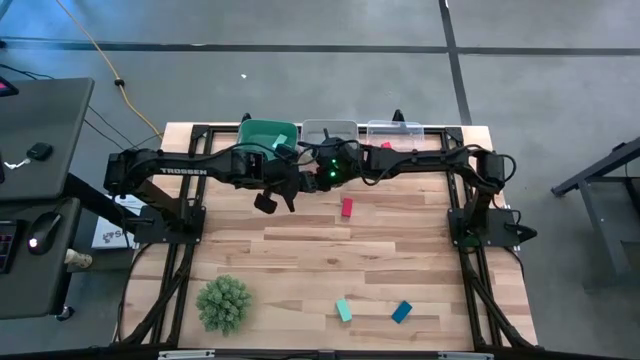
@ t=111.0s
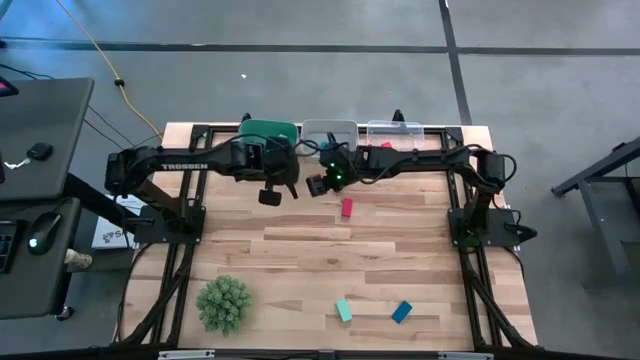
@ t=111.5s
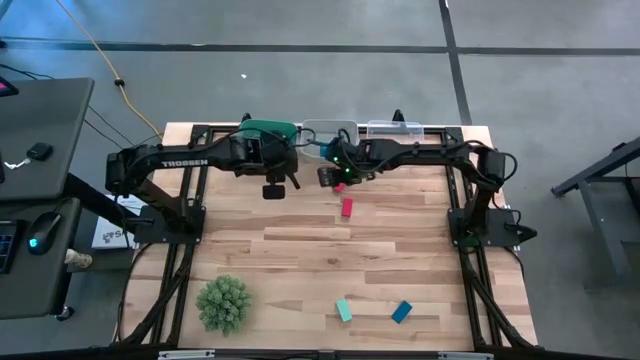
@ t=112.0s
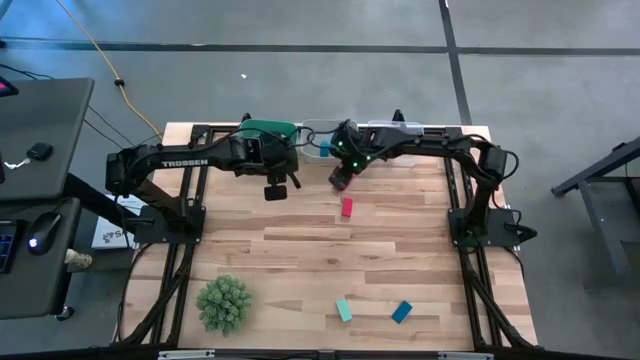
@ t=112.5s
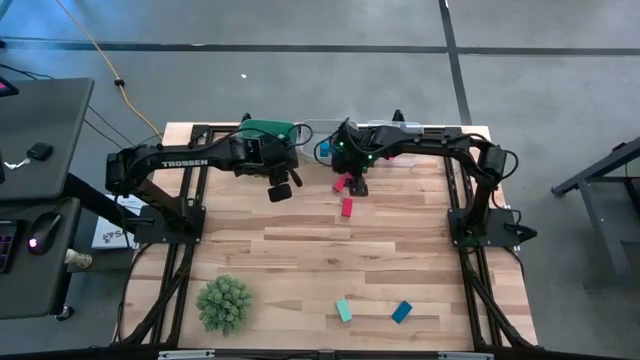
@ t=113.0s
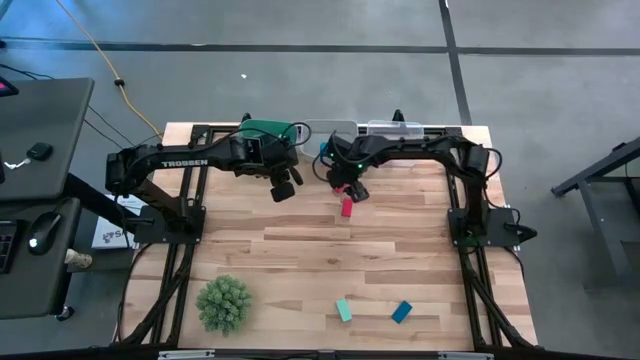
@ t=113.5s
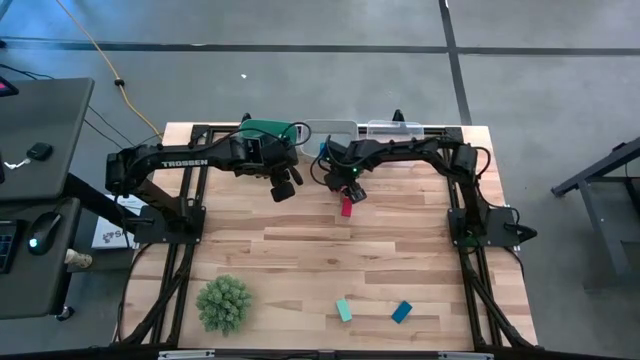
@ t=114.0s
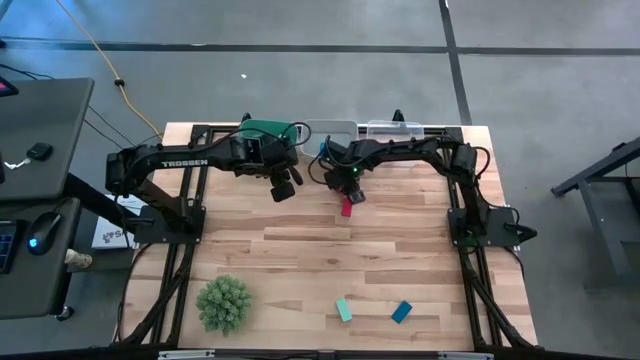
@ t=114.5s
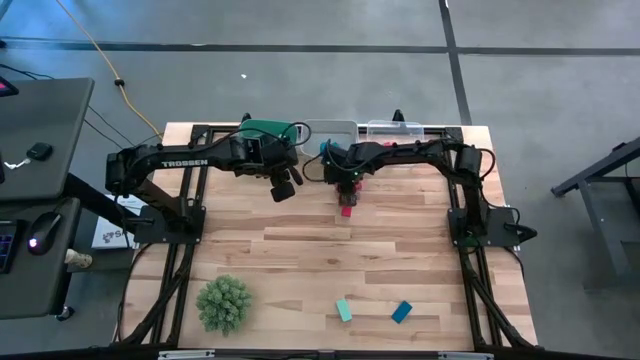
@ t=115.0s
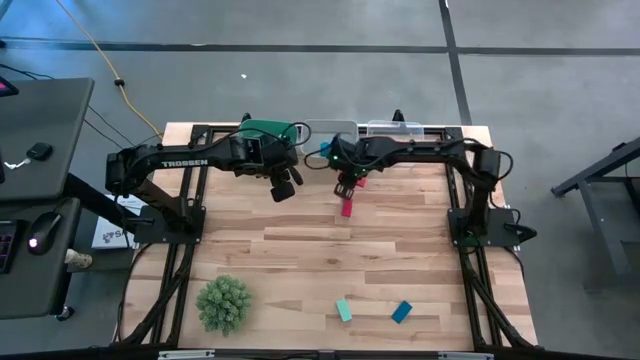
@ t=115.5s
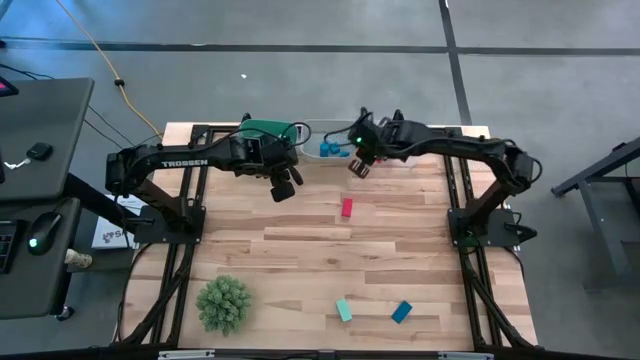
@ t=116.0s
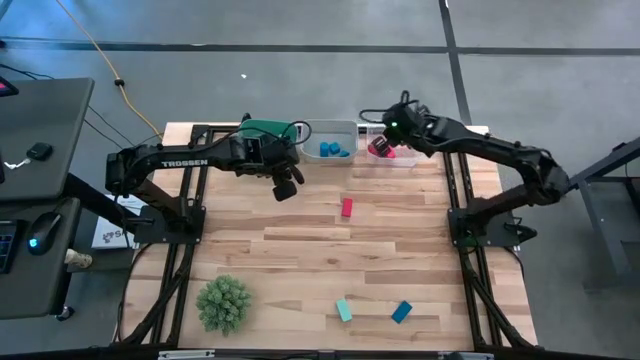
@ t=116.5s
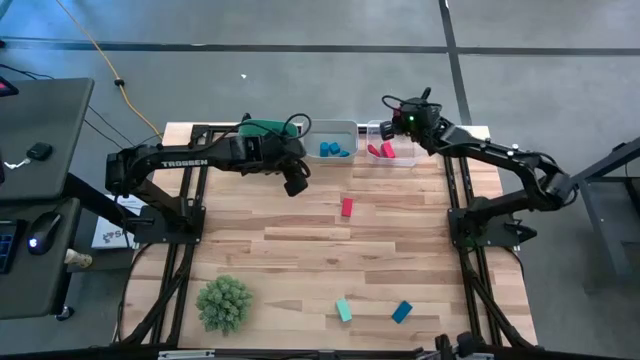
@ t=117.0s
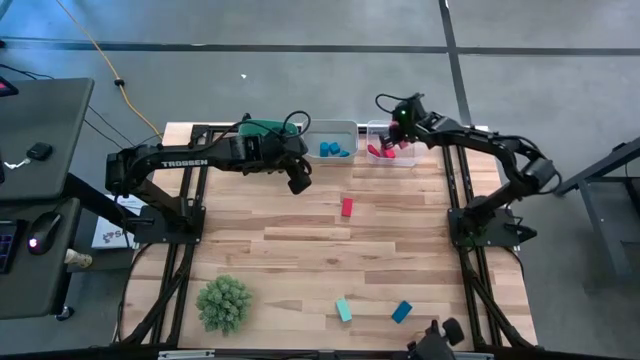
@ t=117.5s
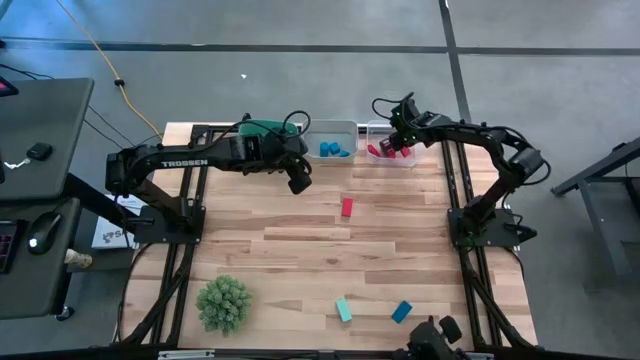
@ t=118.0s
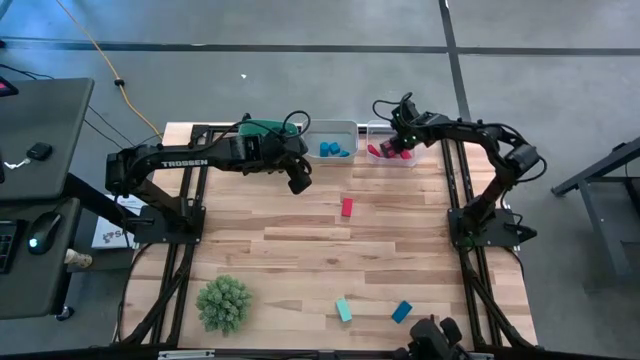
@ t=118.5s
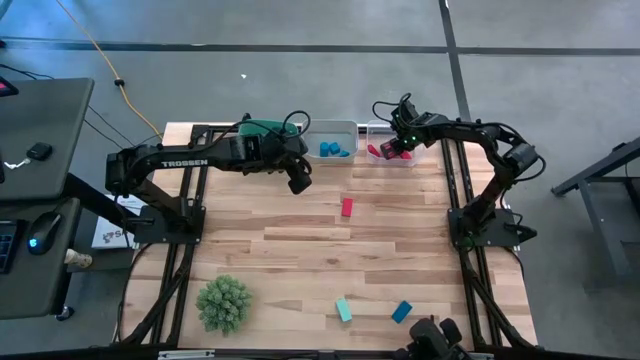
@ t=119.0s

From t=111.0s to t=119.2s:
Task: Sort & place blocks by color
Put the left red blocks into the transparent bin

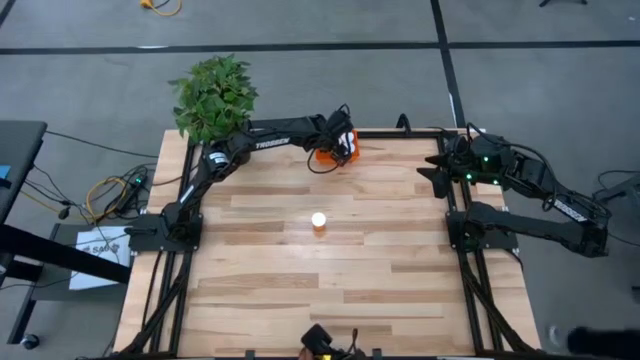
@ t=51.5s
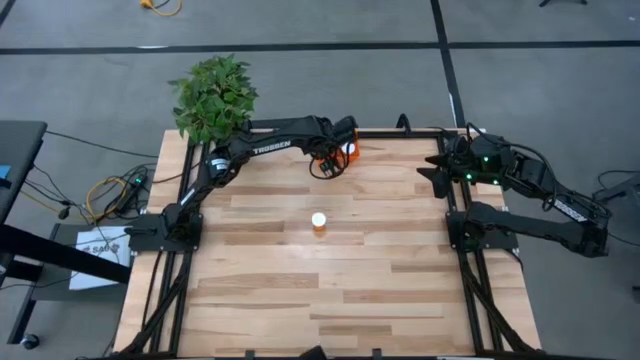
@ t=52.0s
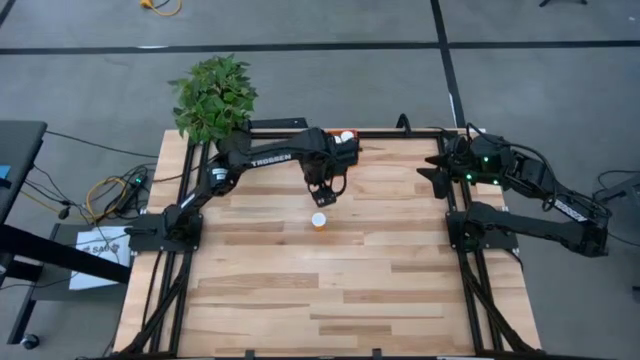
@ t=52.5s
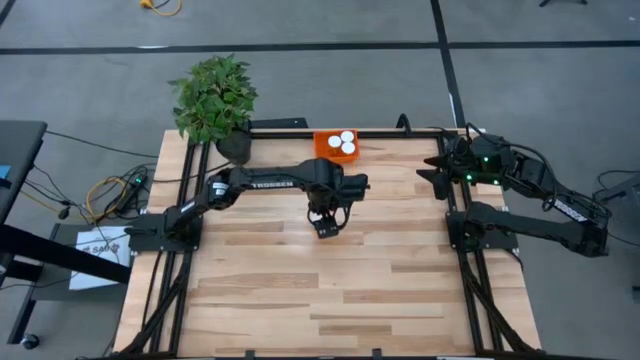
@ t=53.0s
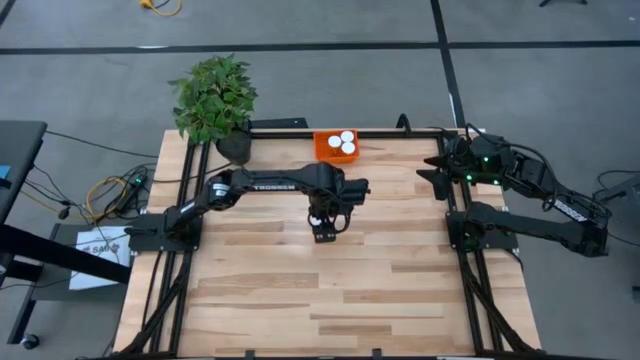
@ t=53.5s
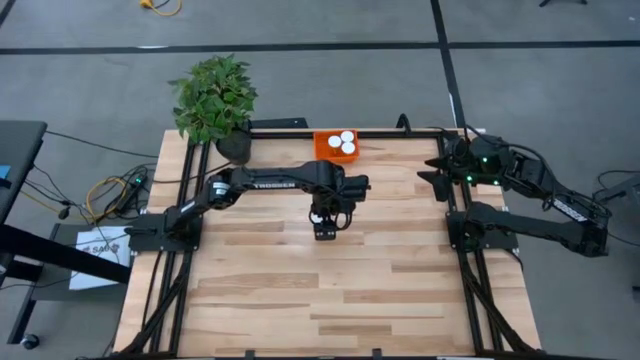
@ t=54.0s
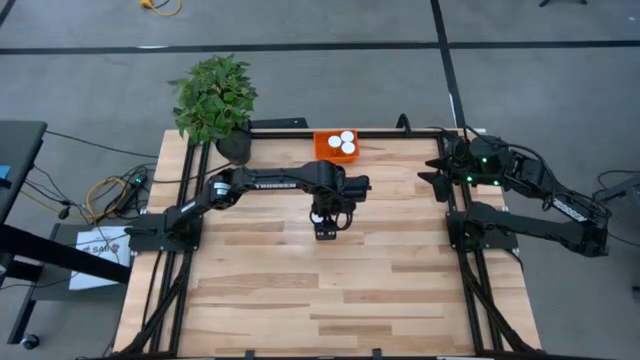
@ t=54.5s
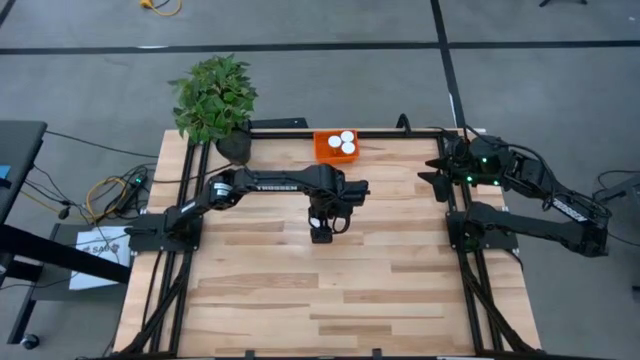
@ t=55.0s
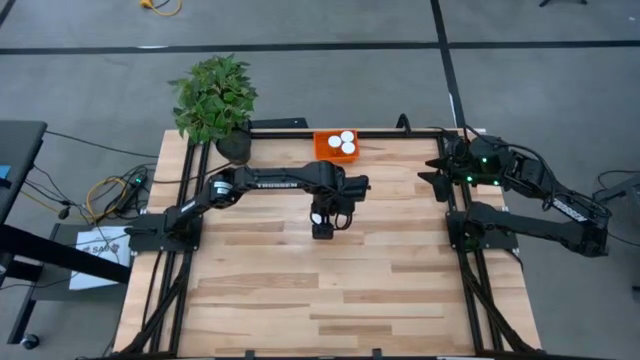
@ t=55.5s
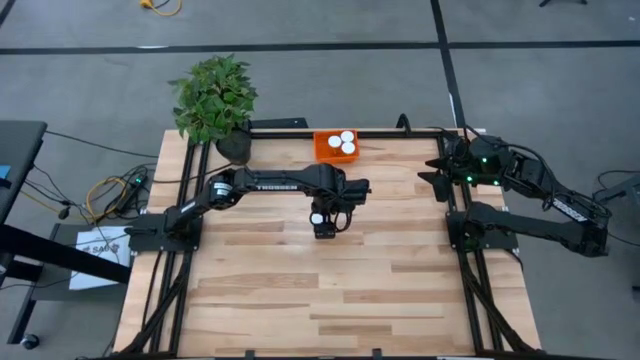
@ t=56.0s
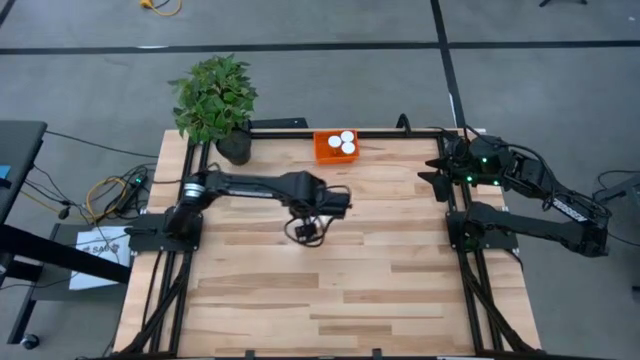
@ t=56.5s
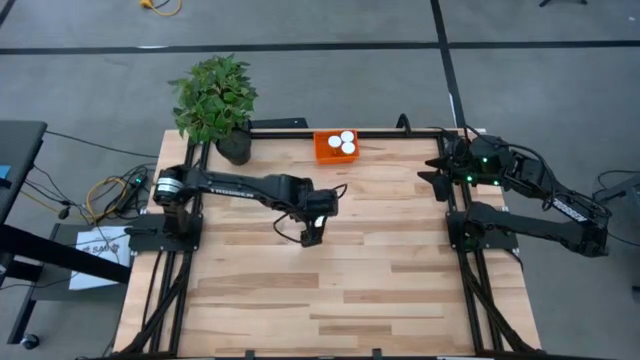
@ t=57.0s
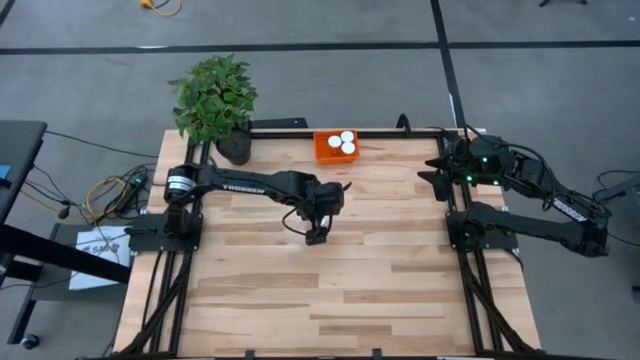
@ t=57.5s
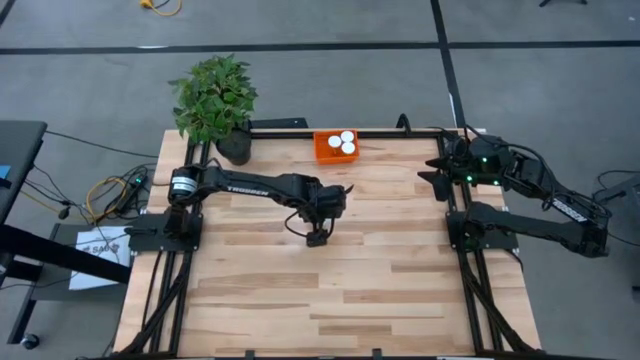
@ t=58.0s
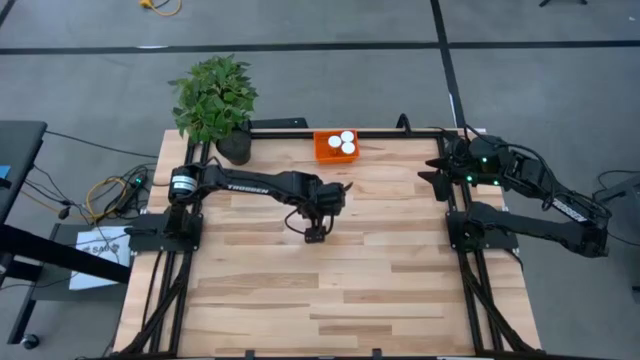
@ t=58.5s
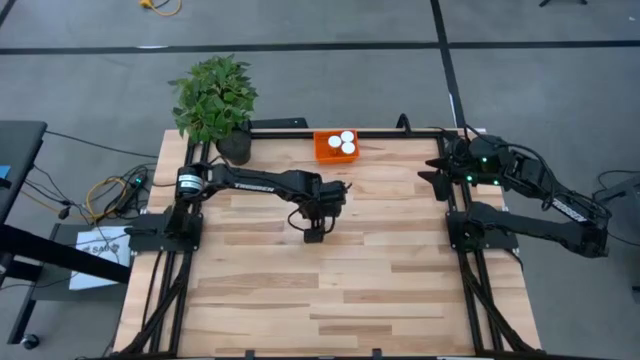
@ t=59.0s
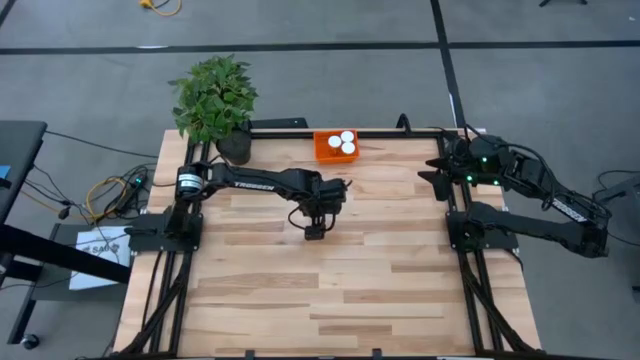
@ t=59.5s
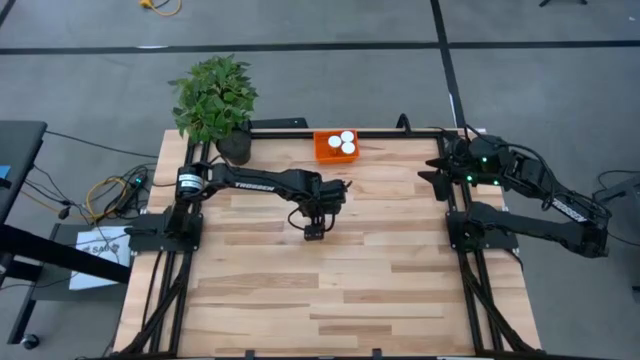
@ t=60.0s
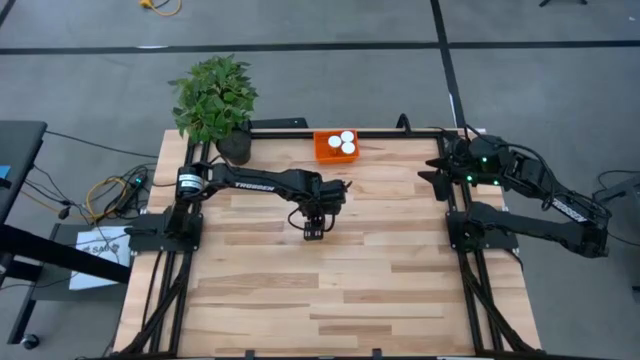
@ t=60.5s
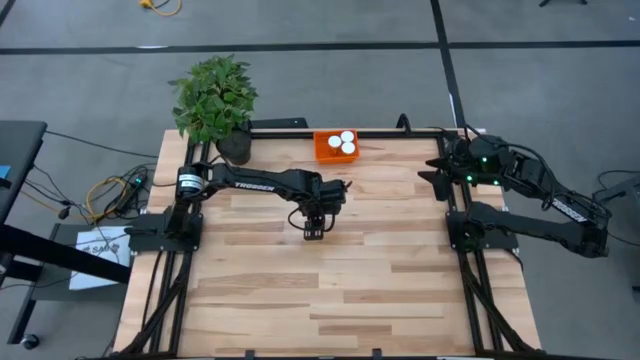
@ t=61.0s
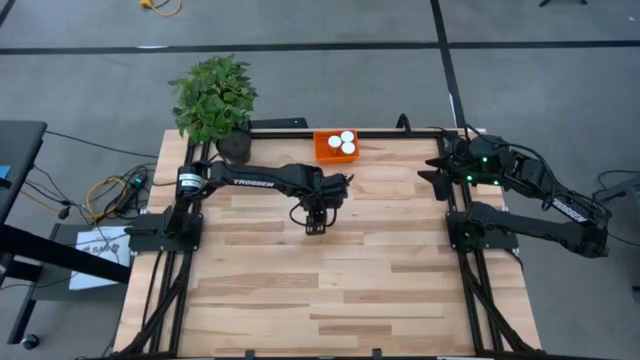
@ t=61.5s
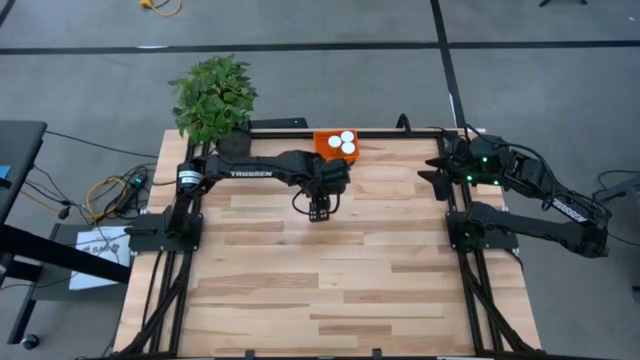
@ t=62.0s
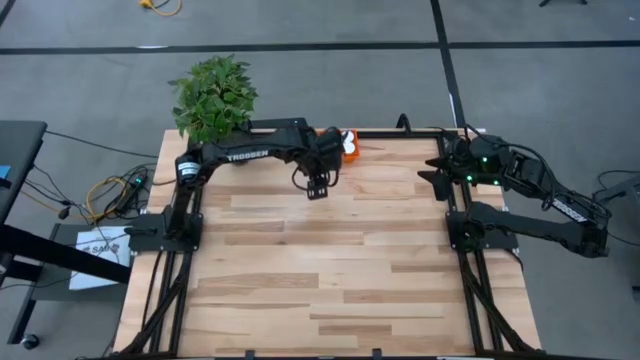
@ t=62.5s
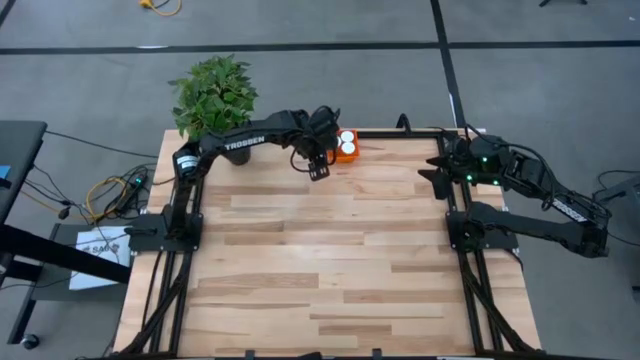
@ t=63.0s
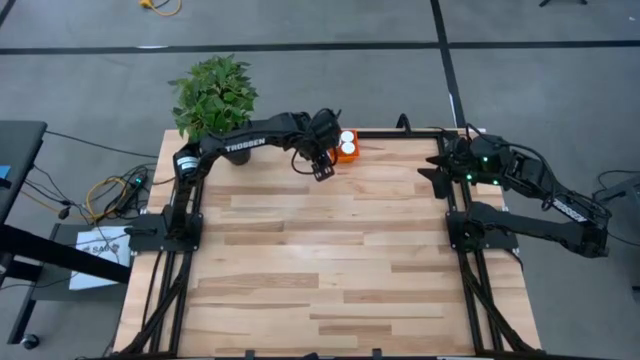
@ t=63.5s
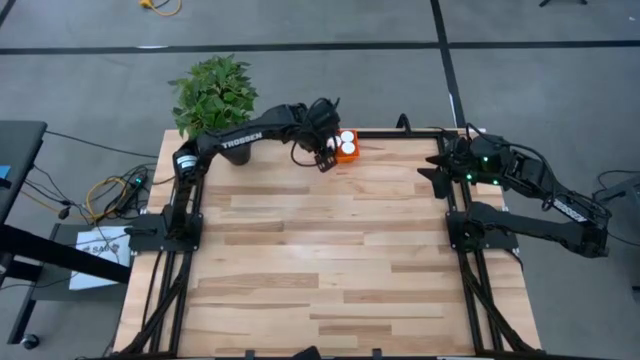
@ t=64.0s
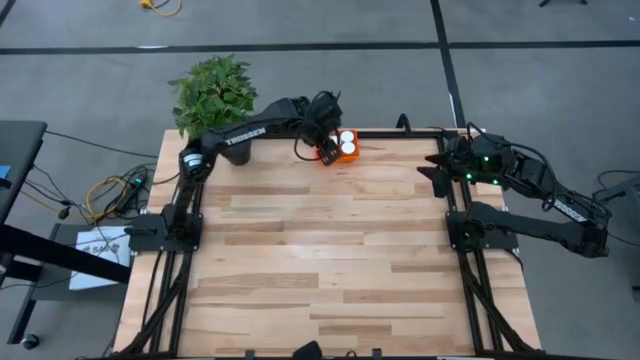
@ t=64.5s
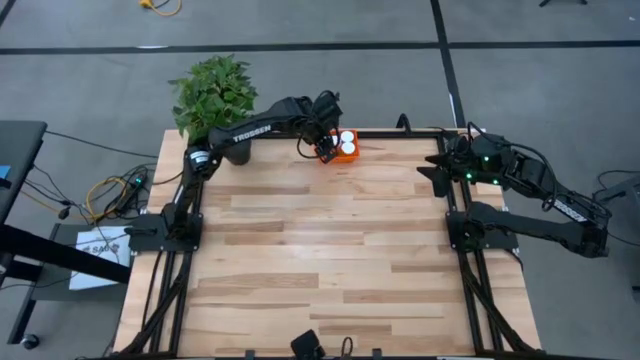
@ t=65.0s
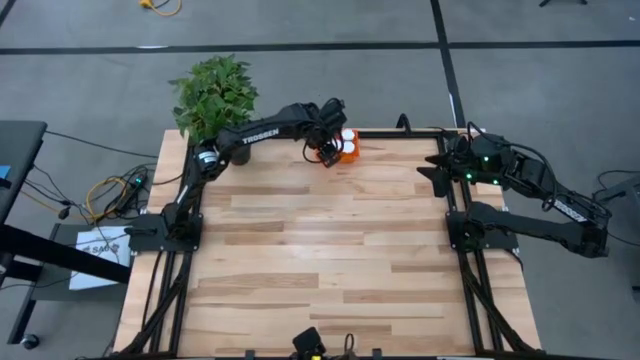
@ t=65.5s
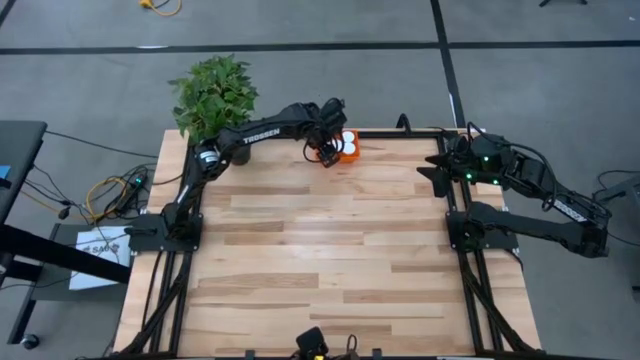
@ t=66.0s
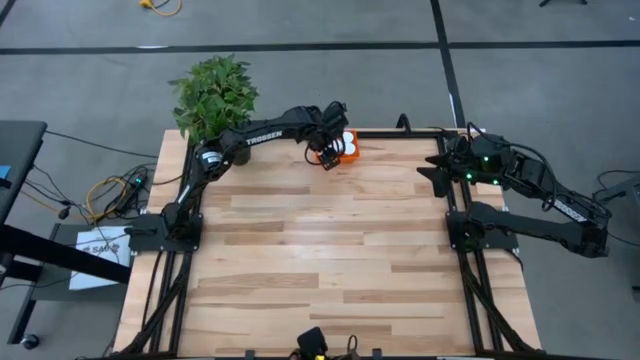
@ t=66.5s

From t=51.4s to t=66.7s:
Task: Pick and place pill bottles into a basket
Put the orange pill bottle into the orange bin
